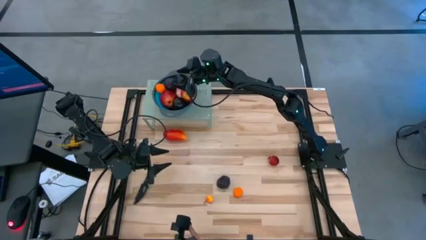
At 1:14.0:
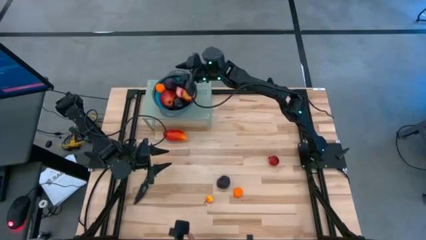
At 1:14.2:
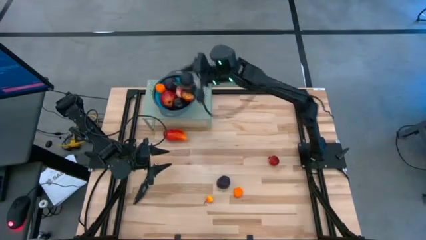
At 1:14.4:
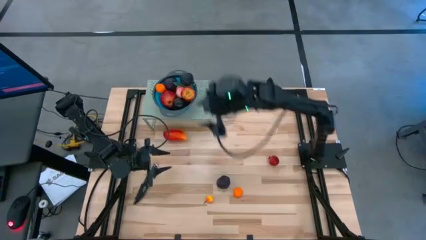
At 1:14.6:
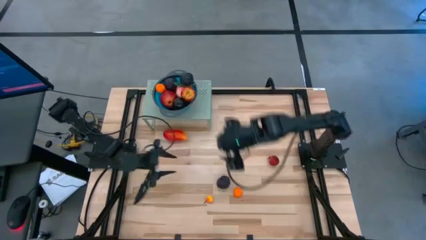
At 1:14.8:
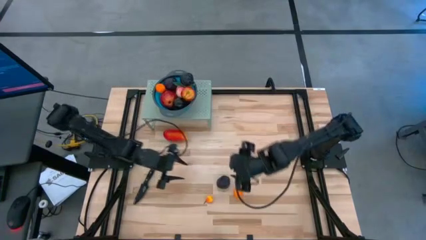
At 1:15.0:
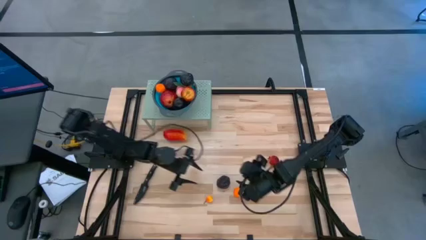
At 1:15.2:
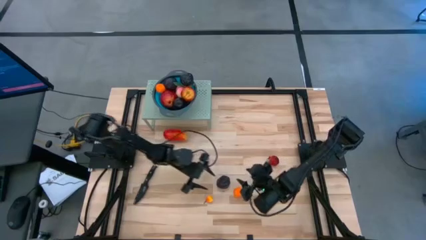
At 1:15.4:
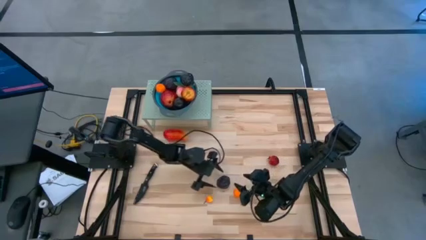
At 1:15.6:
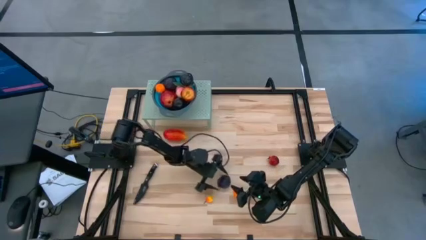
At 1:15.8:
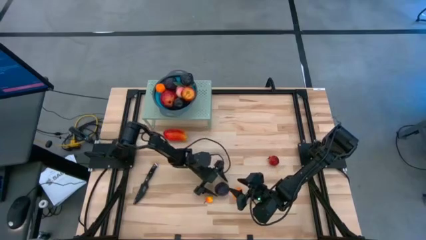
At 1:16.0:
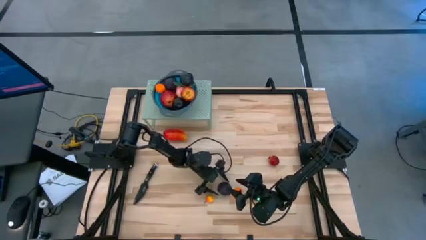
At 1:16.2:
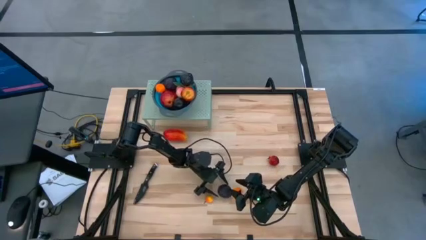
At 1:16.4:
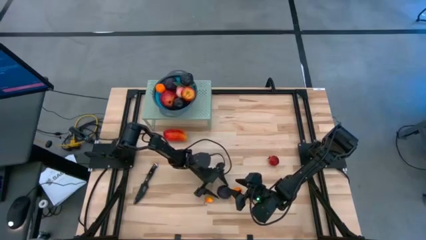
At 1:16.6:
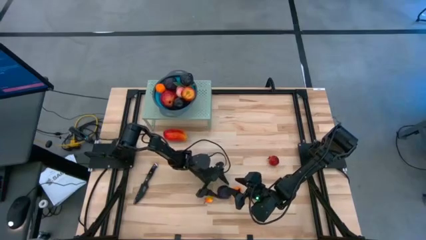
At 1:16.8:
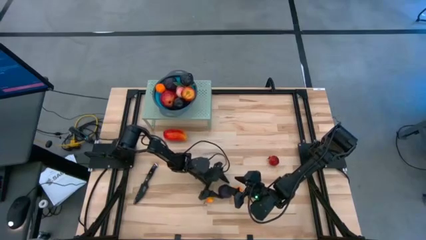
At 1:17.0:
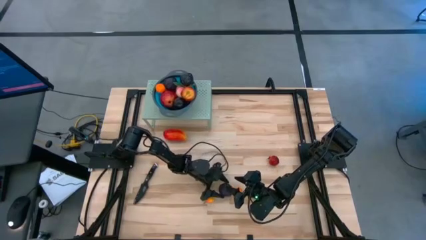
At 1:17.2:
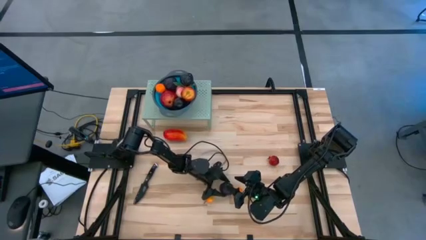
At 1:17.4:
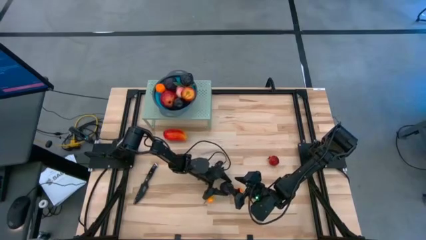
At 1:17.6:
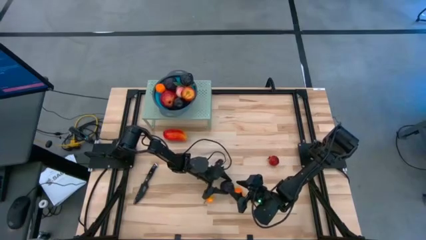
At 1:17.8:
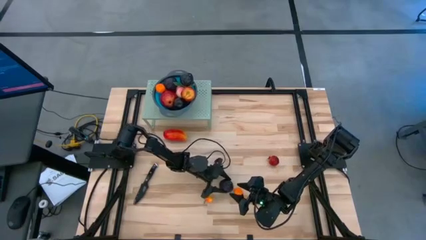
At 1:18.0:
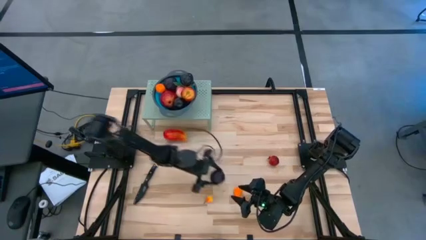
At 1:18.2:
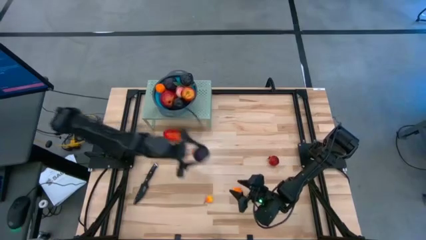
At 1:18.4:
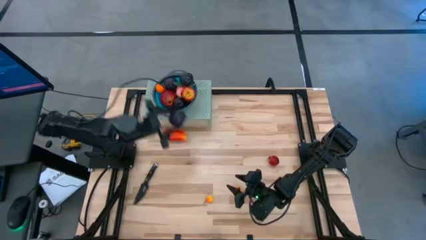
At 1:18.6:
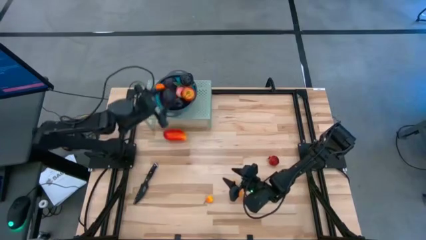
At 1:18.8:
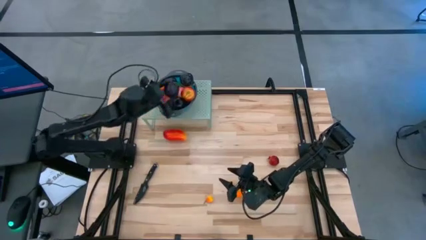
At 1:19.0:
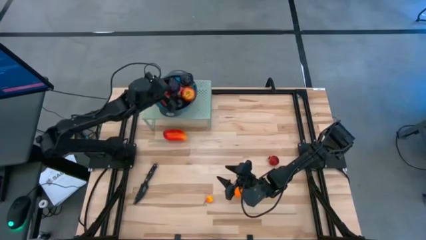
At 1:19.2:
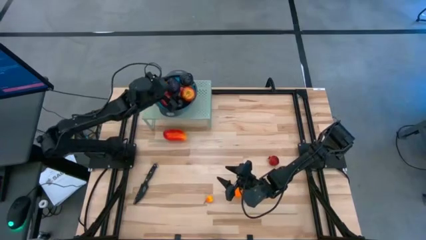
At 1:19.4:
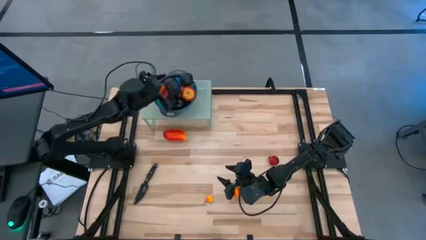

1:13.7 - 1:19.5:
Task: Pick & Place Fruit
Put the violet plum into the blue strainer bowl on the shelf

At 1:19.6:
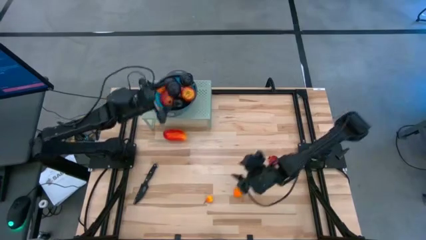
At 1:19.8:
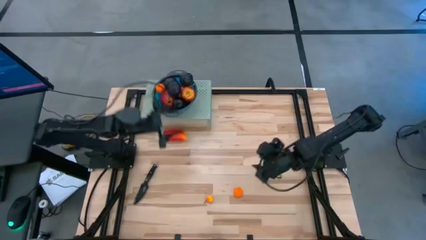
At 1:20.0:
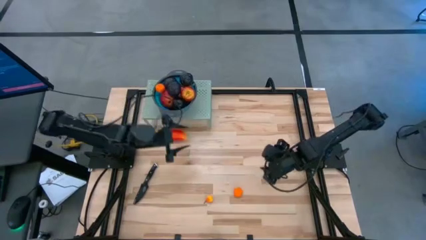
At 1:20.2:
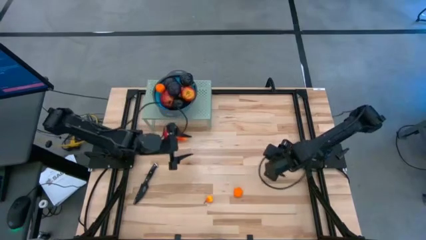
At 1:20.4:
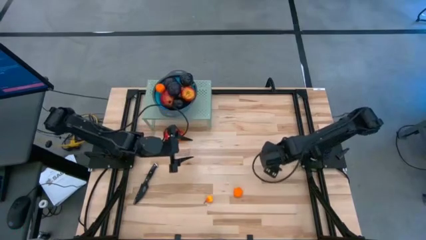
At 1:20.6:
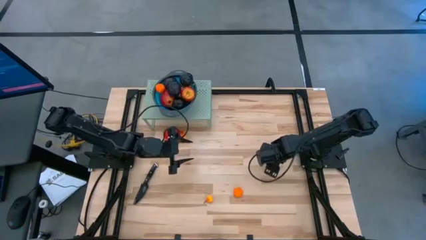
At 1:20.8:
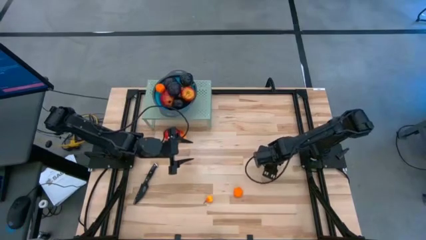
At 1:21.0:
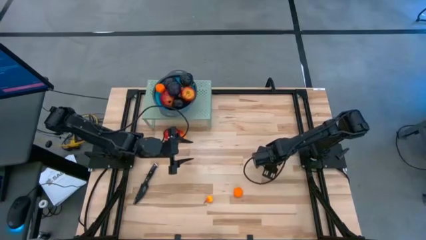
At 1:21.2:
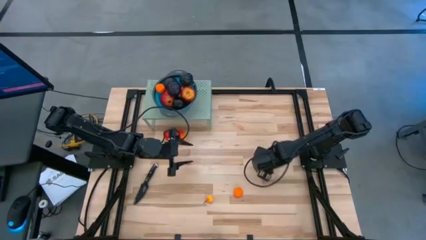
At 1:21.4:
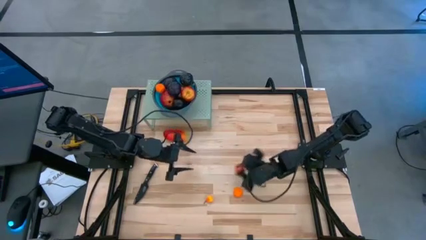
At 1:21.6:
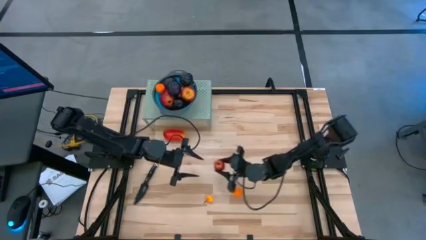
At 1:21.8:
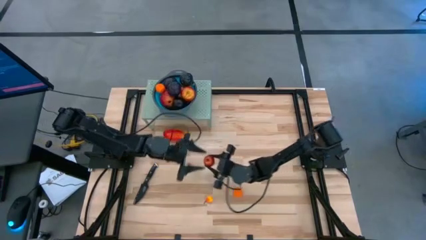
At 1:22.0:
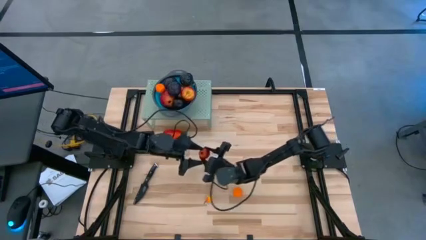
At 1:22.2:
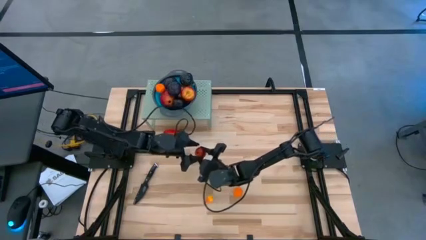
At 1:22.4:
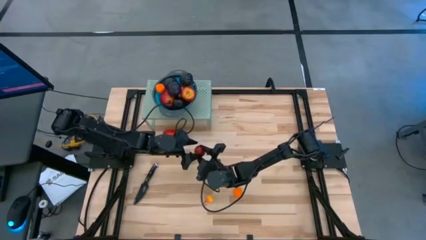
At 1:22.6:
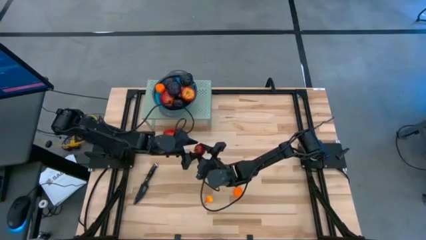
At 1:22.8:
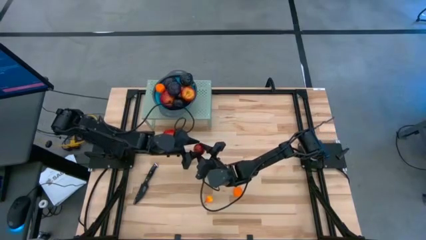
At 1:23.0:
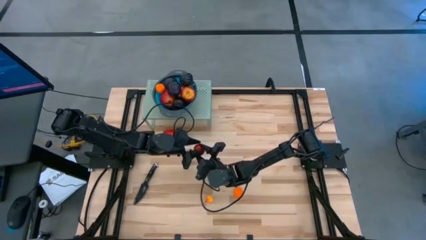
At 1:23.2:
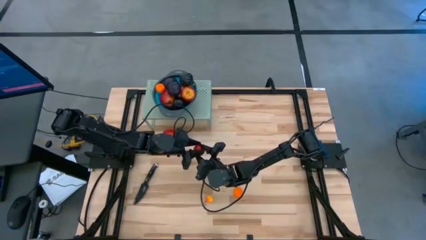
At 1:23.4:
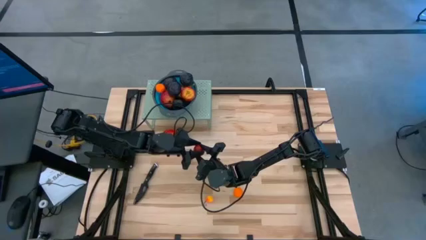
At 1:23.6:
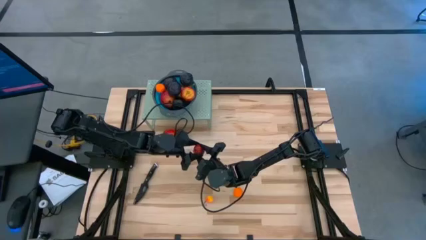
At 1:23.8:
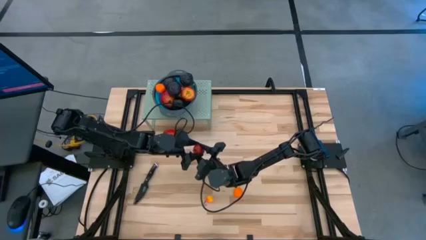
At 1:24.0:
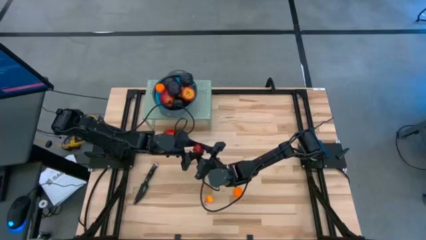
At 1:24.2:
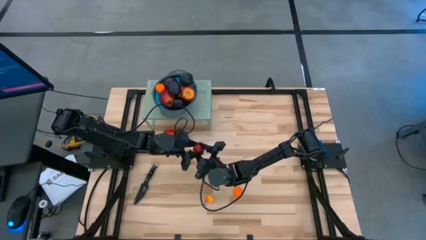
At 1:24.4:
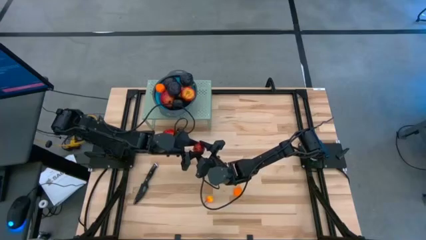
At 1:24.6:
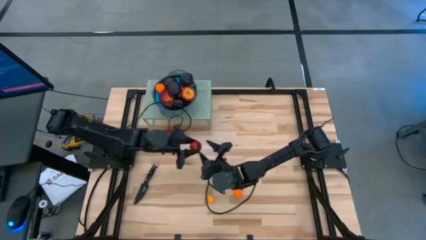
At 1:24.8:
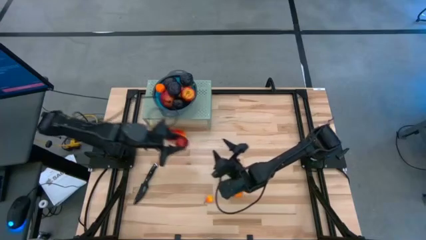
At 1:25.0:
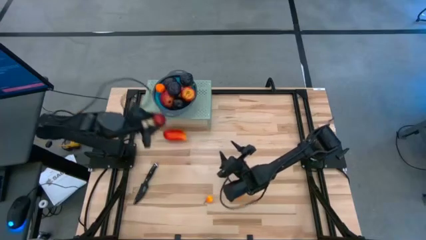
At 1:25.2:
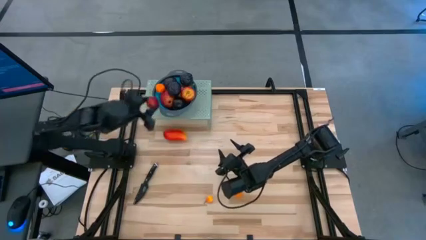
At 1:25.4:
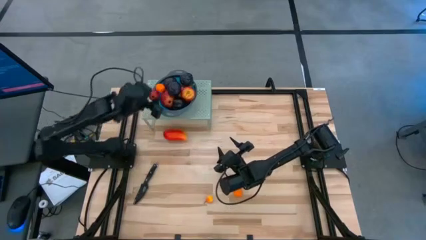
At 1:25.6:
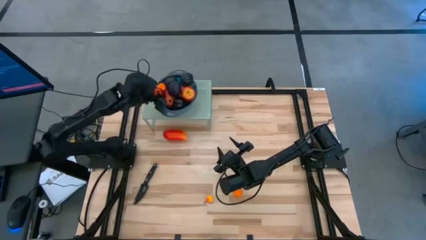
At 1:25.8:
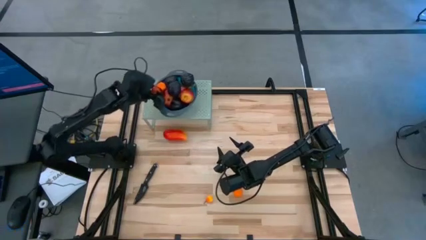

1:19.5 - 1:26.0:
Put the red pomegranate into the blue strainer bowl on the shelf

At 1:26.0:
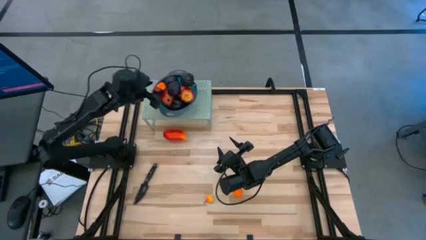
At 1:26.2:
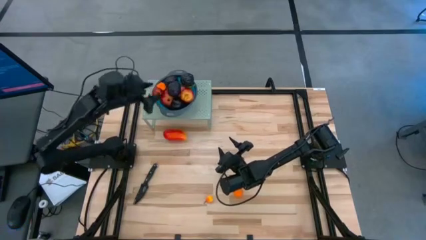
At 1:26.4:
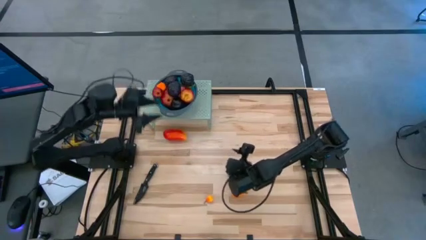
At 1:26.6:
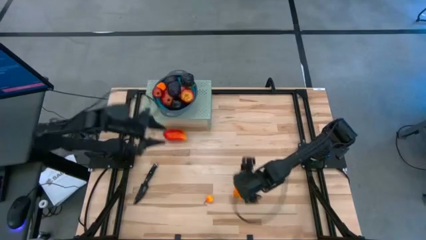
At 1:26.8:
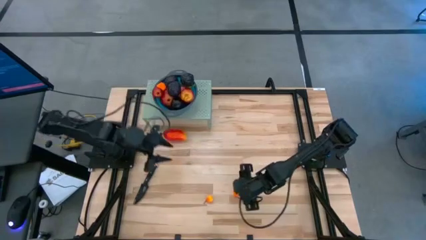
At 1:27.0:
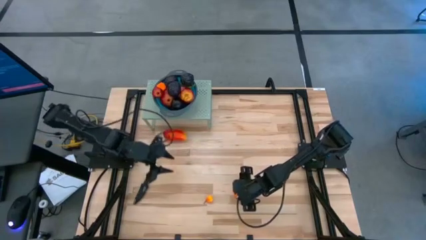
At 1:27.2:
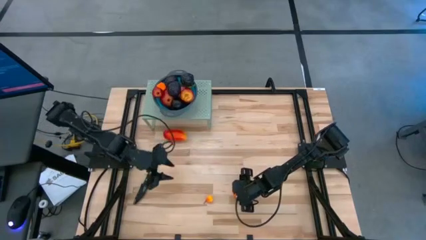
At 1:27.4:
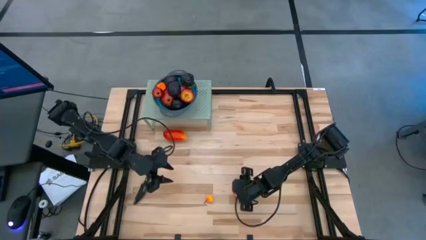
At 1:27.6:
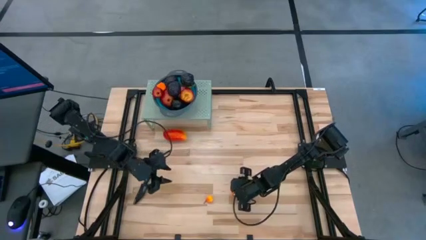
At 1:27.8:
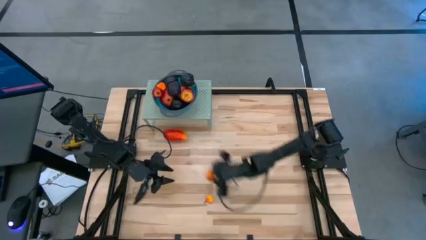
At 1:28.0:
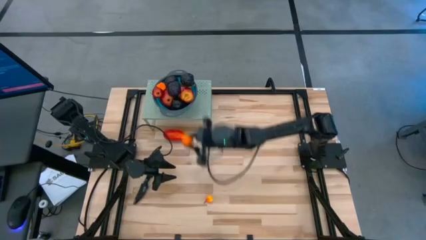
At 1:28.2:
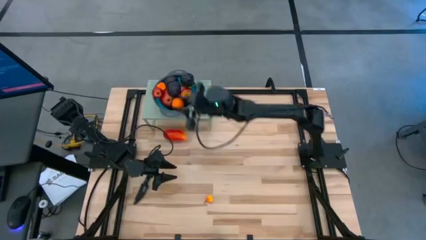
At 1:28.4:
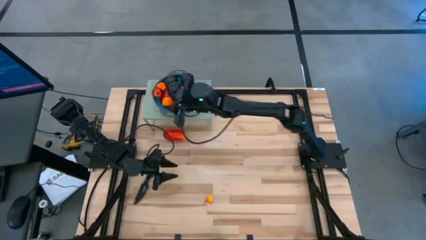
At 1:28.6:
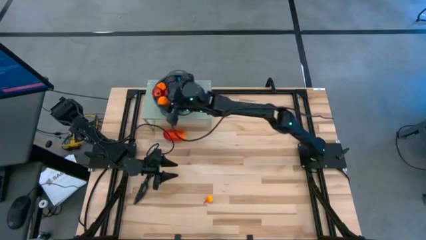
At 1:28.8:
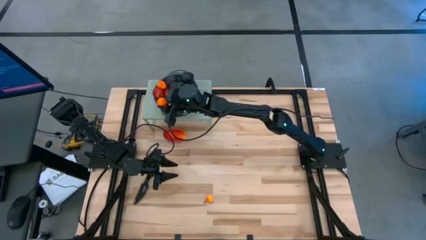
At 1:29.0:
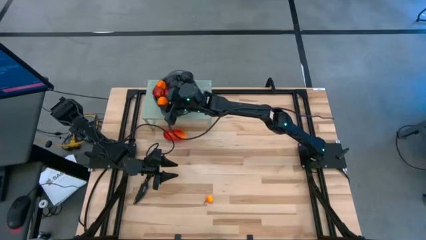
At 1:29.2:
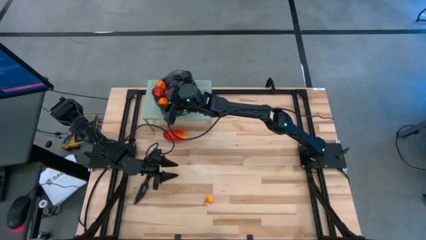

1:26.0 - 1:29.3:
Put the orange tangerine into the blue serving bowl on the shelf

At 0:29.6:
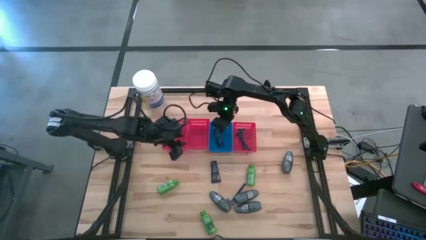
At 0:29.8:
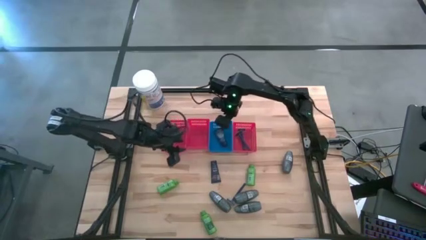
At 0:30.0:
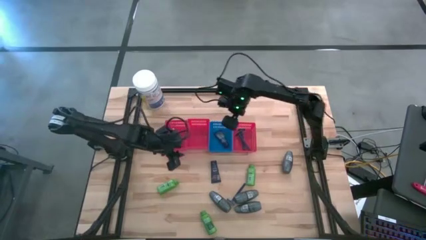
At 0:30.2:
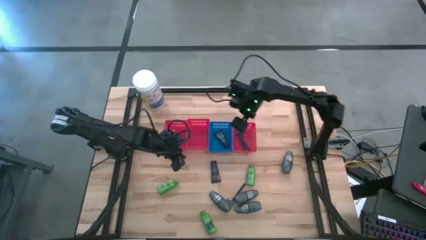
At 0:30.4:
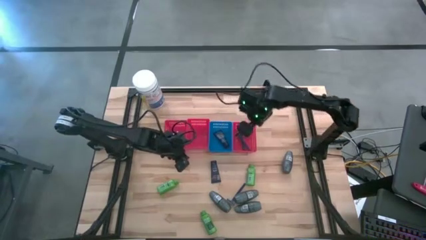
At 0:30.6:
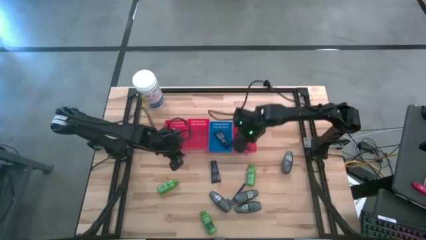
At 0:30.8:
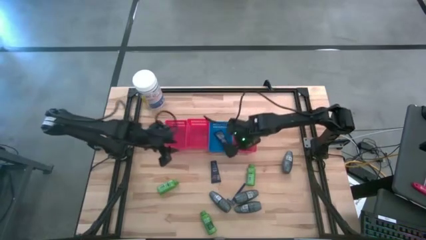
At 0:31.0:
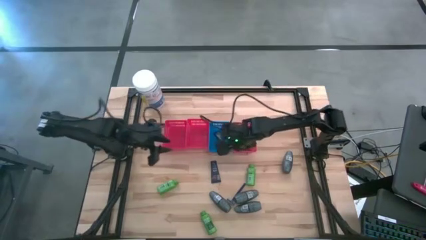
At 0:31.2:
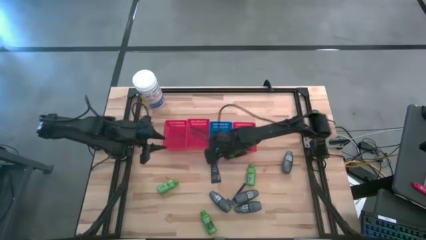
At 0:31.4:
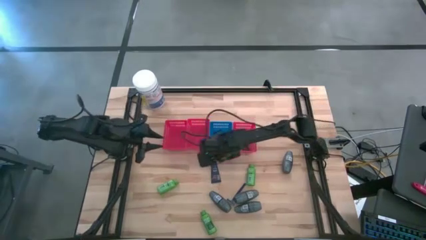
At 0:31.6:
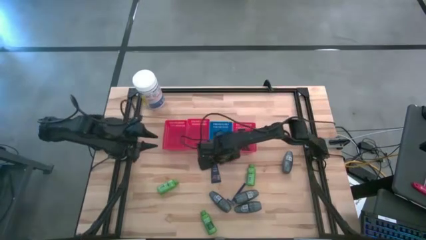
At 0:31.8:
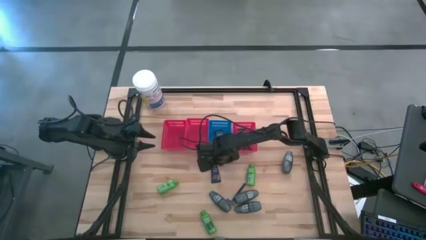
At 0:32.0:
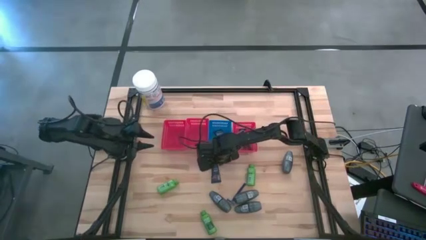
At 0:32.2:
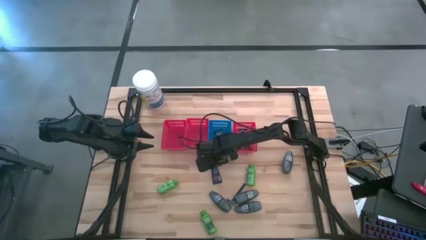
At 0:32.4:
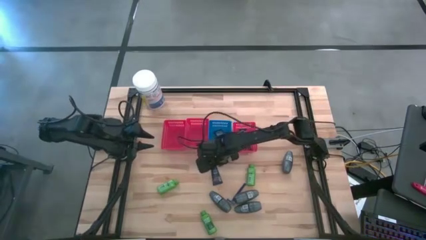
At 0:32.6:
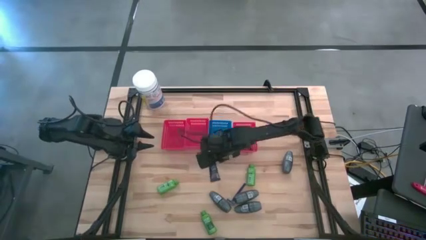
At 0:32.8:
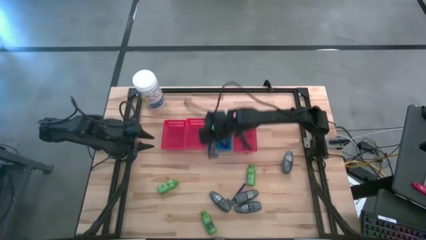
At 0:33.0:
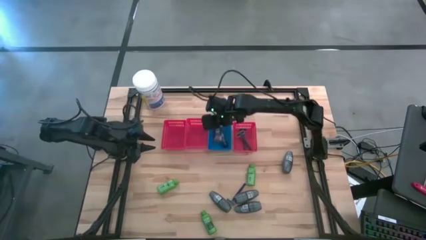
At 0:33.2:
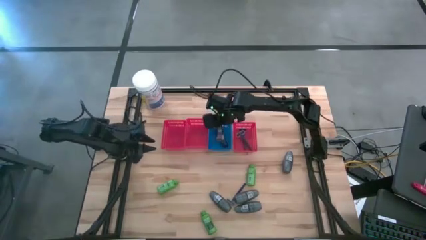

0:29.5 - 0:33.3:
Task: Pick & Place Travel size toiletries
Put the blue shave cream into the blue bin
